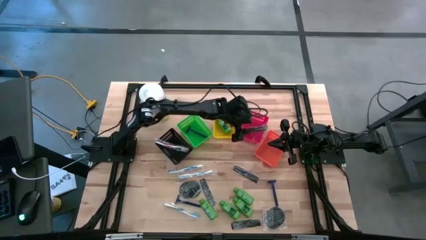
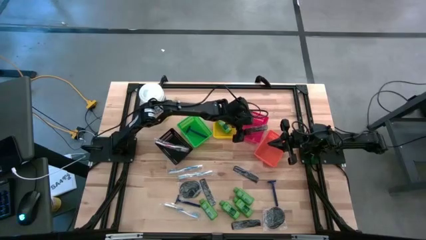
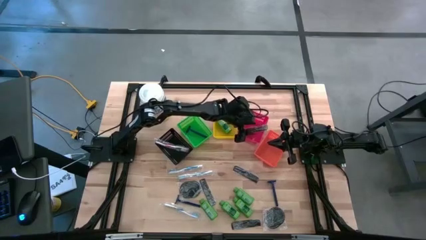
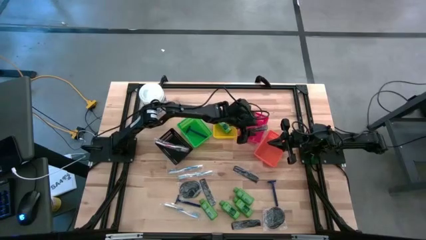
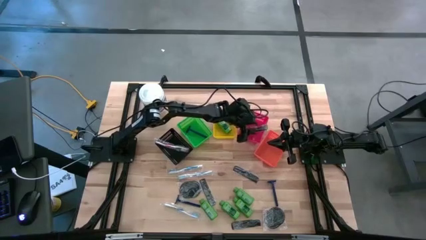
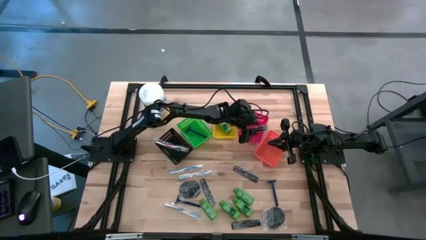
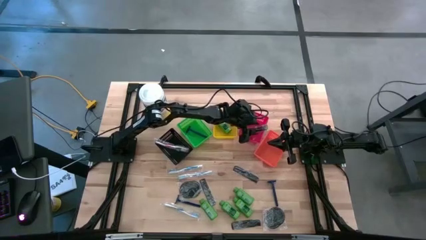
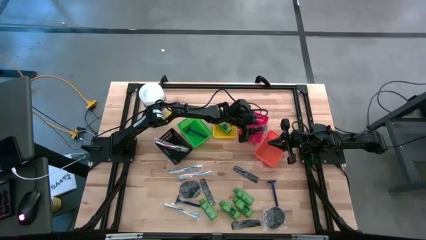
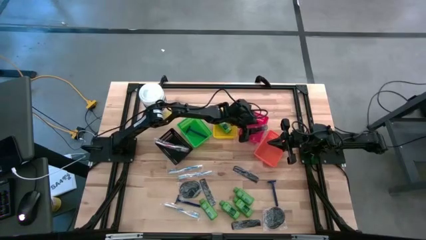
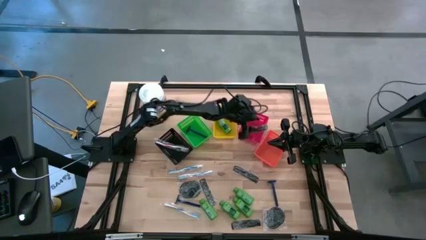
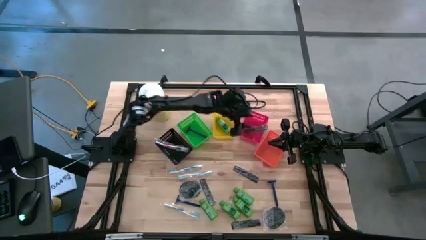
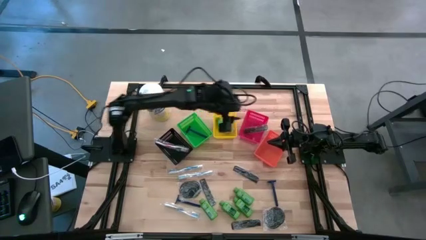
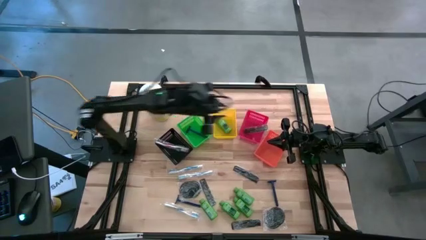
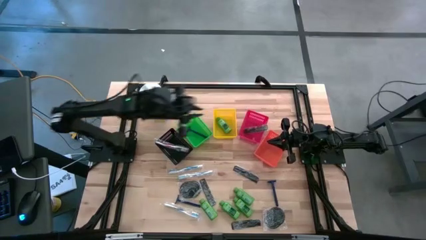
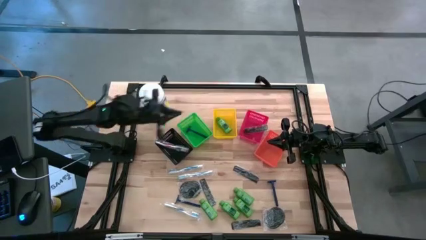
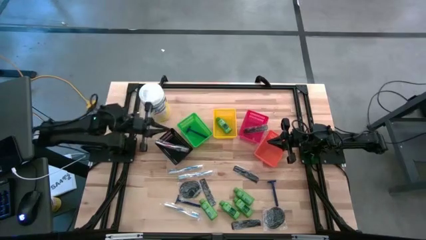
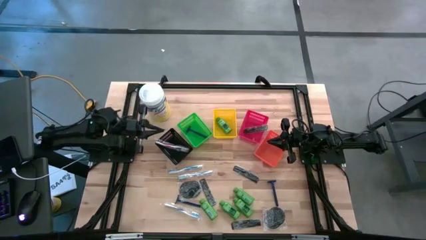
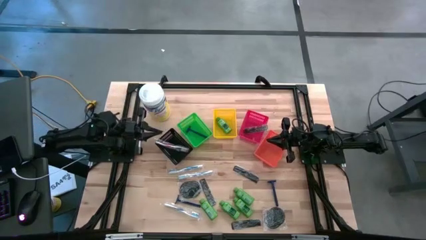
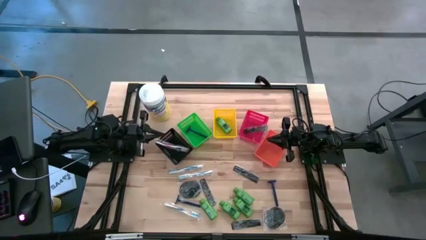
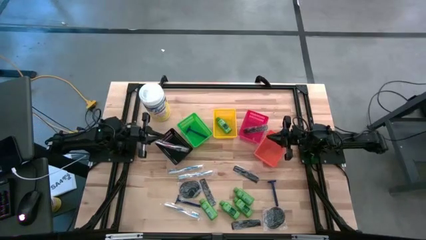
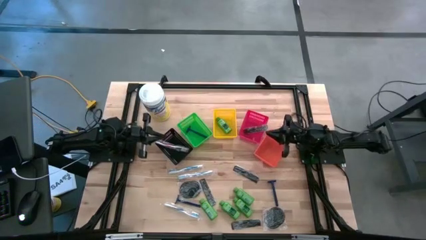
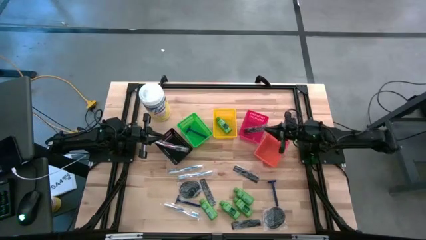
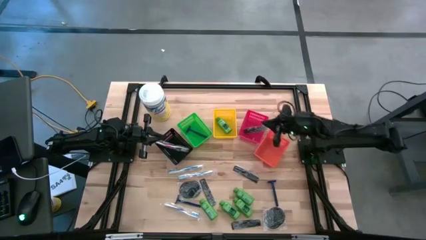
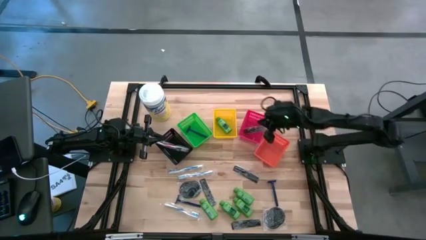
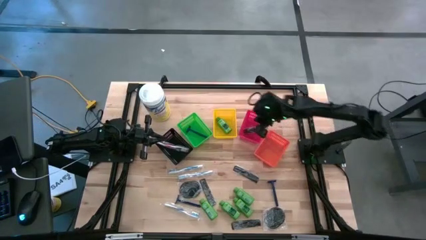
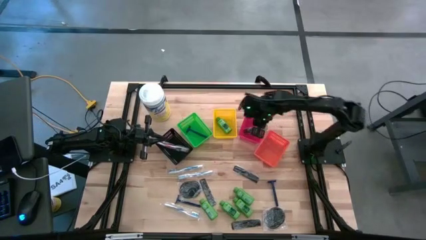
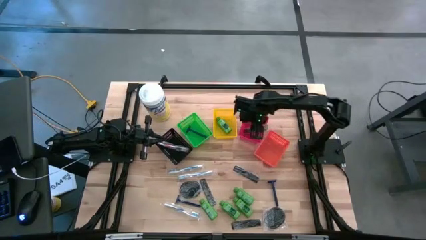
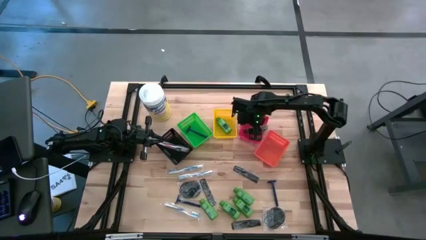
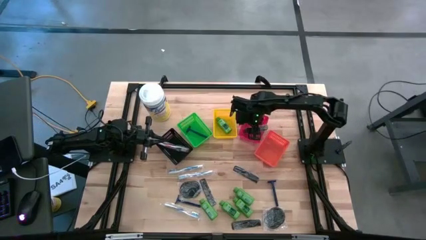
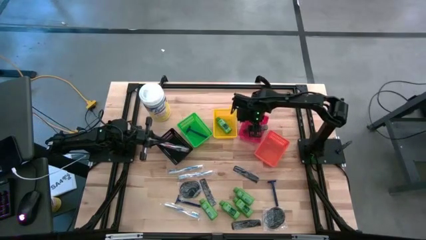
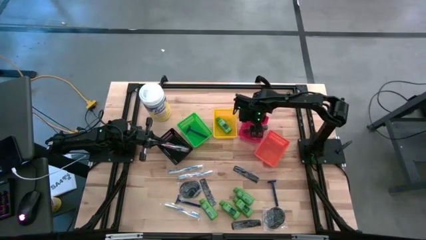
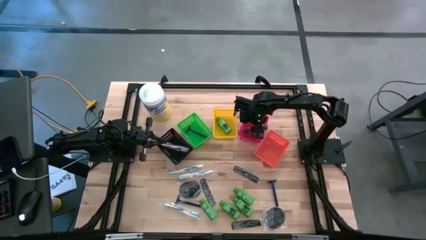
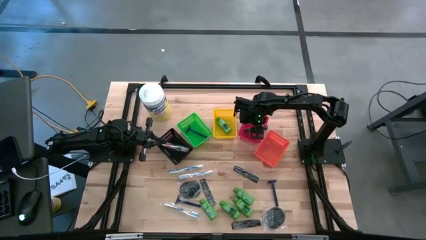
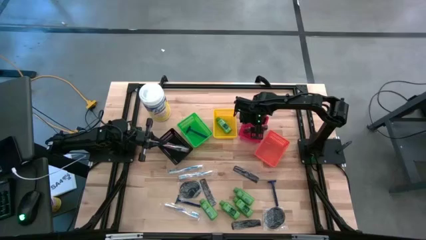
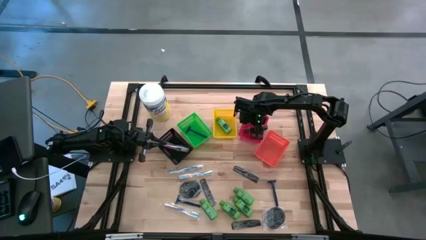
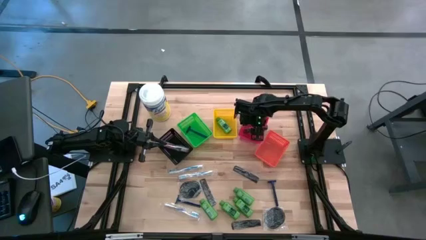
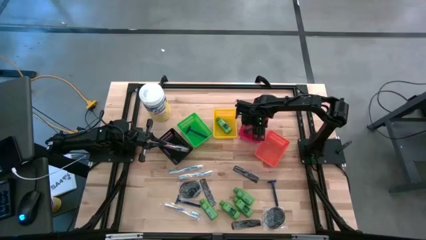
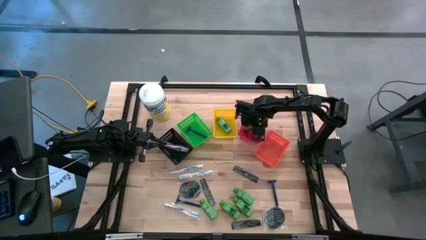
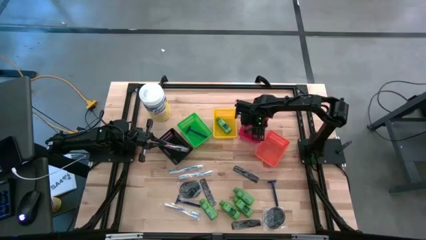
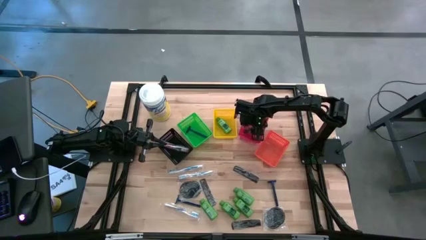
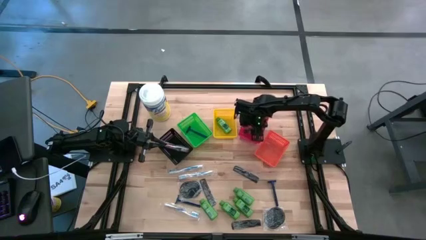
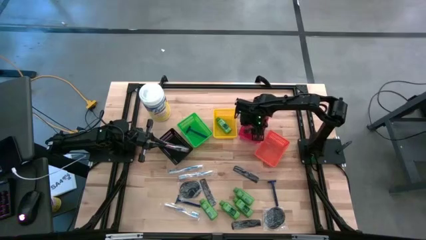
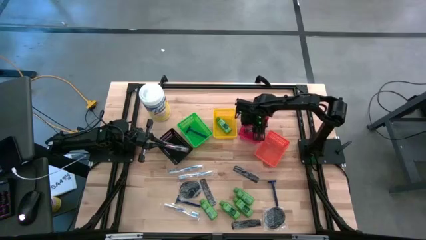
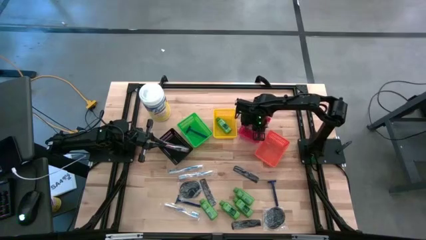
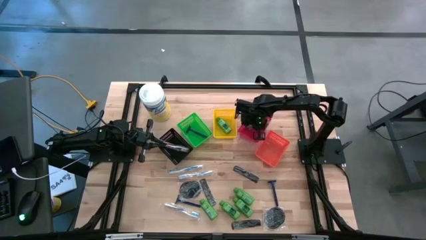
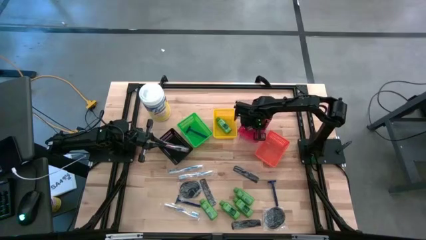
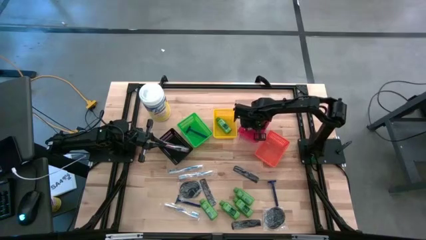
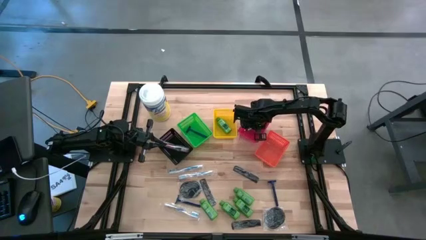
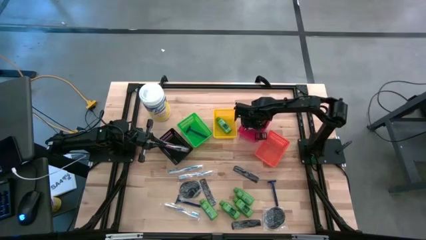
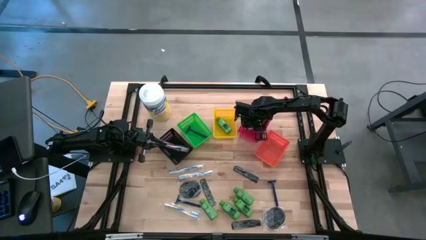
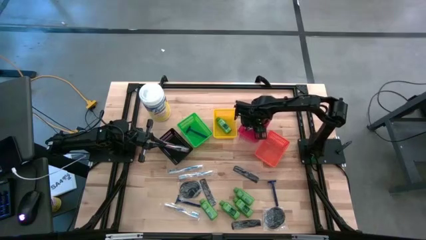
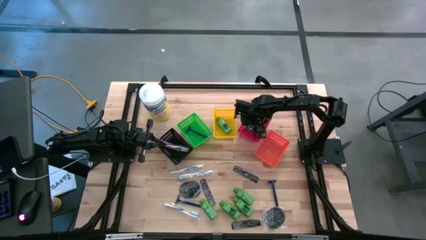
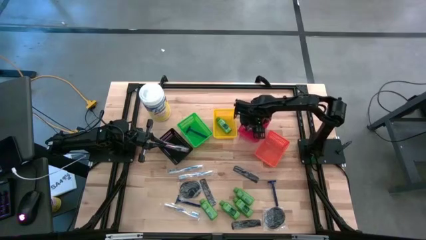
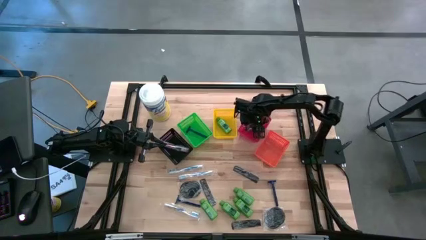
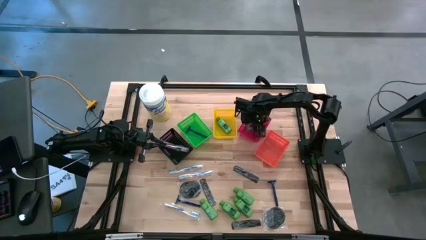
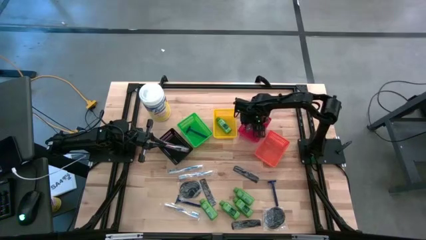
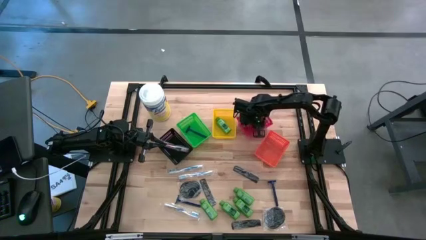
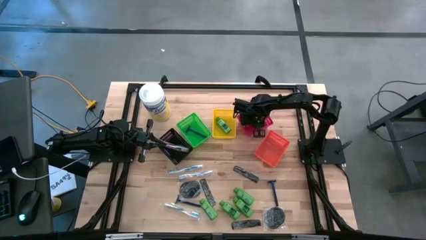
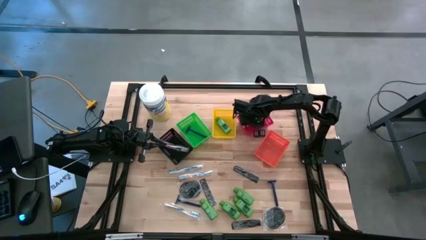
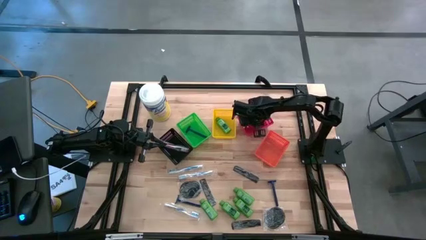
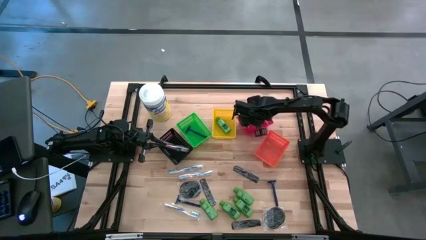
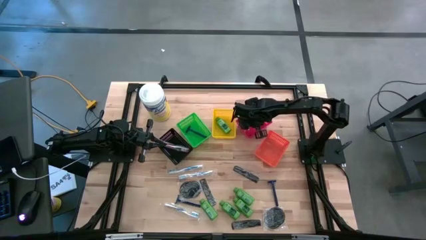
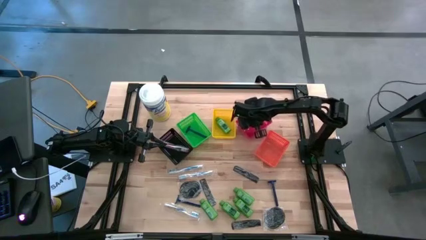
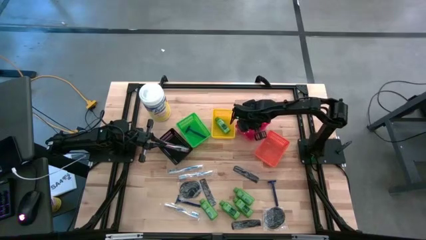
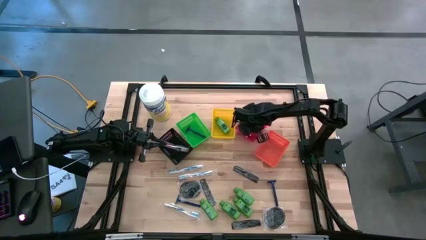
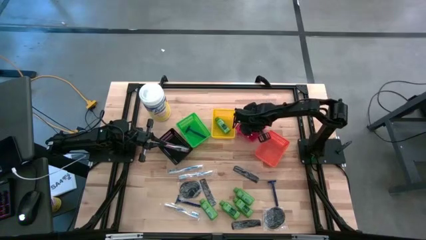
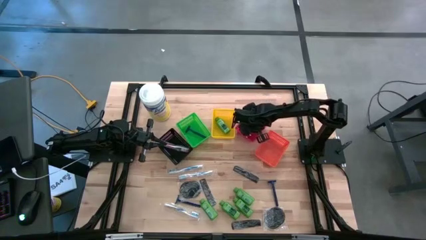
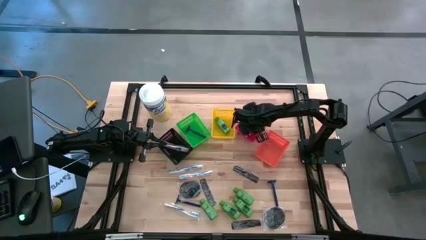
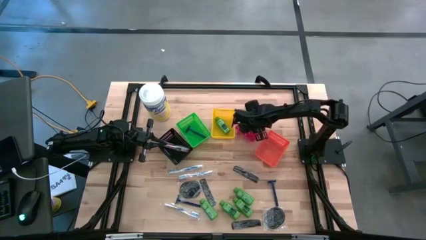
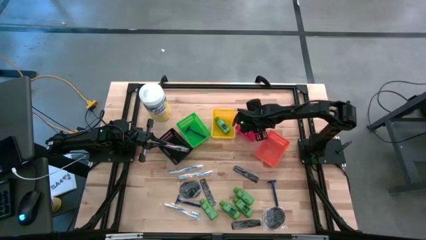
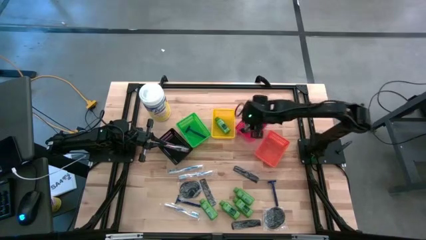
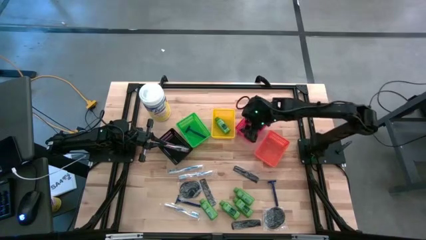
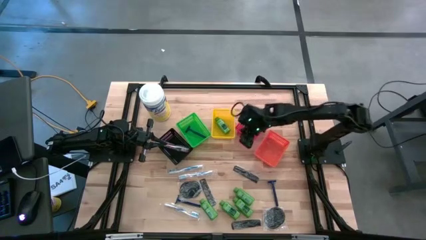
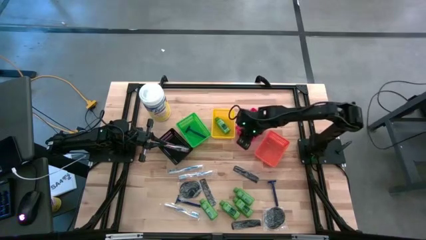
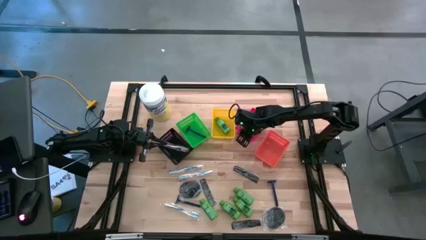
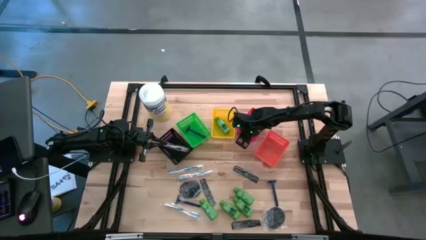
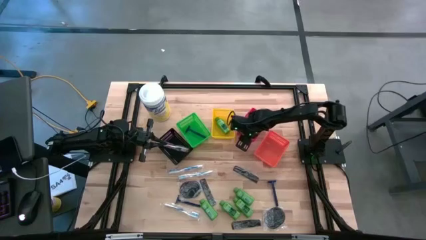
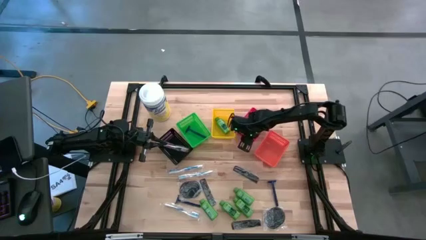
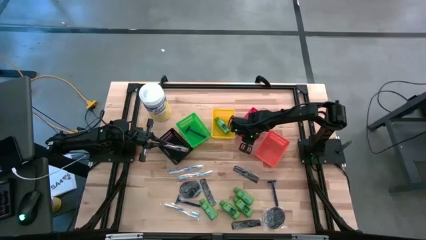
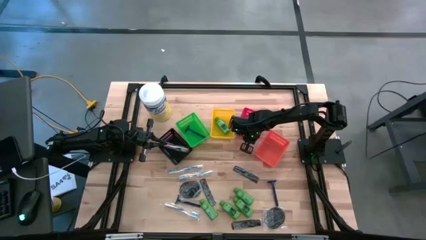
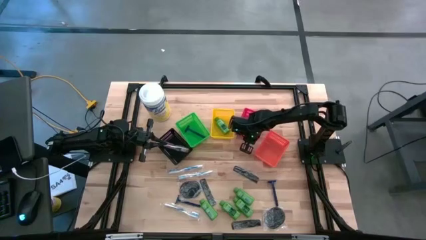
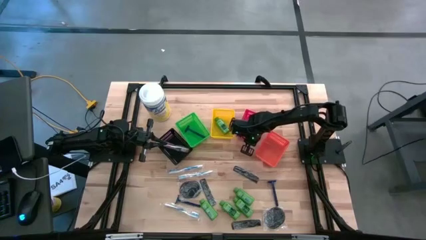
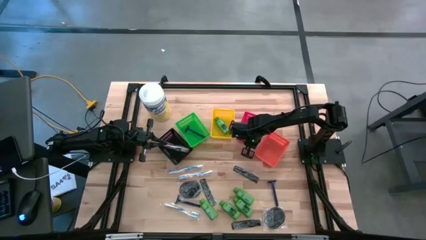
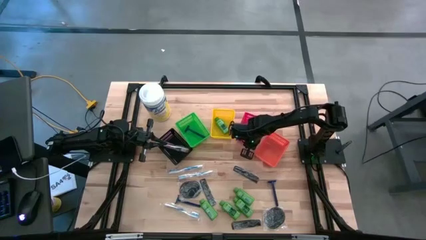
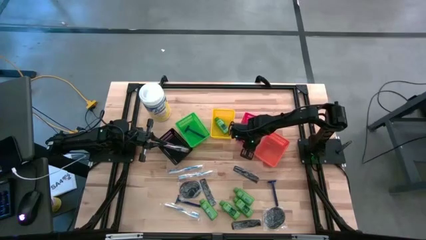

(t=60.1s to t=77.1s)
Task: Pick & Place Travel size toiletries
Put the left black hair comb into the red bin
